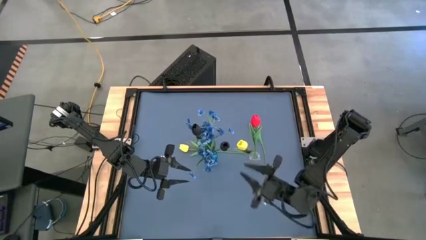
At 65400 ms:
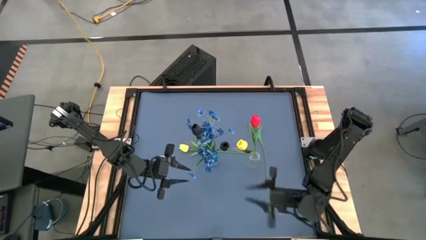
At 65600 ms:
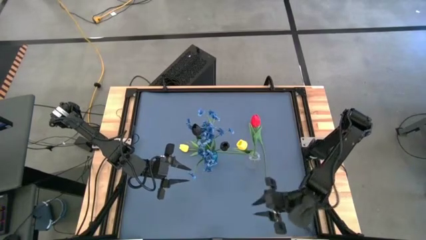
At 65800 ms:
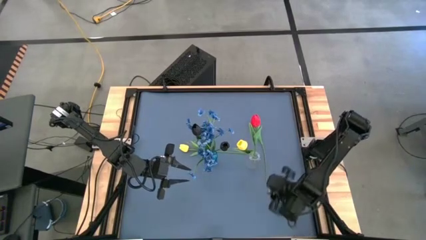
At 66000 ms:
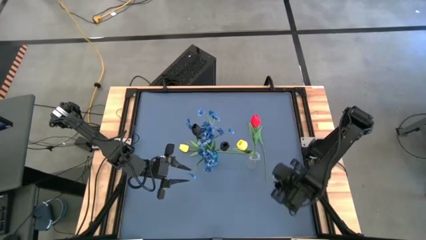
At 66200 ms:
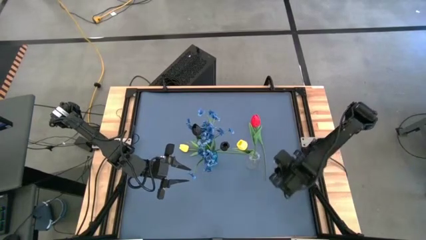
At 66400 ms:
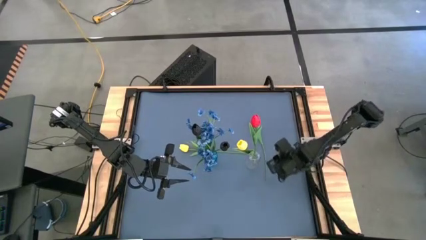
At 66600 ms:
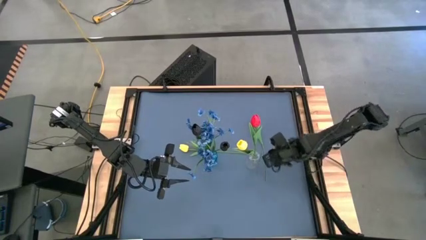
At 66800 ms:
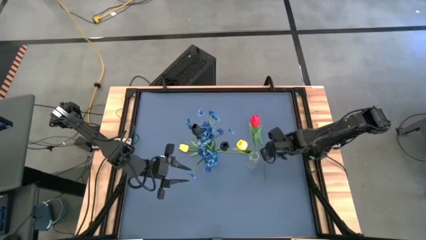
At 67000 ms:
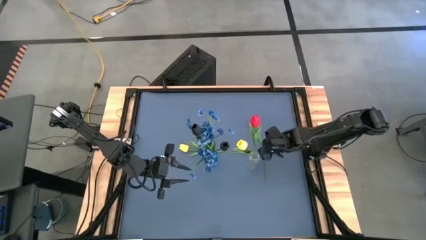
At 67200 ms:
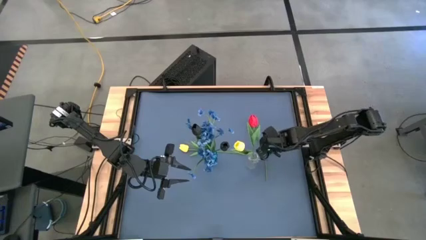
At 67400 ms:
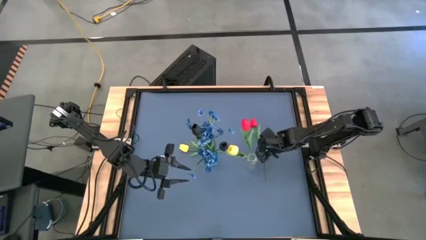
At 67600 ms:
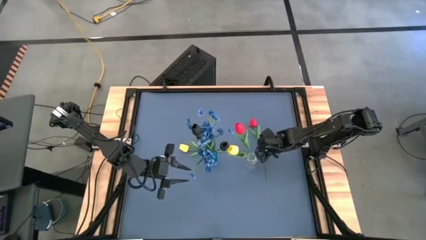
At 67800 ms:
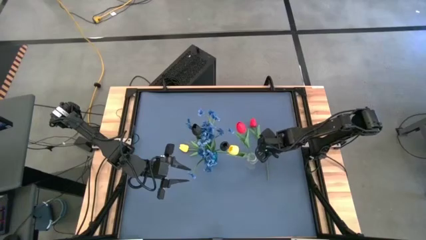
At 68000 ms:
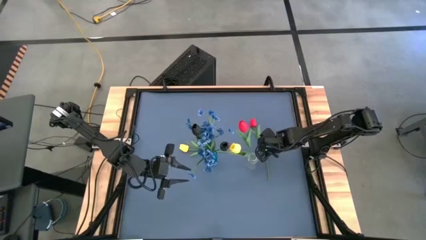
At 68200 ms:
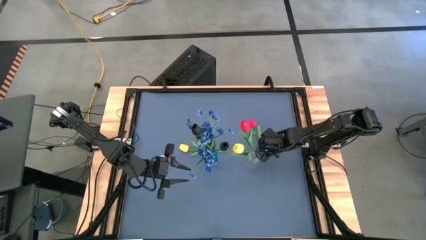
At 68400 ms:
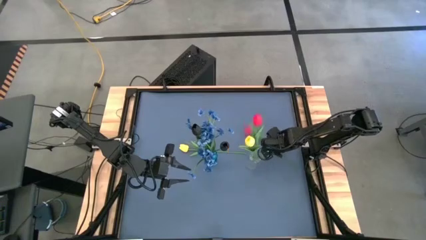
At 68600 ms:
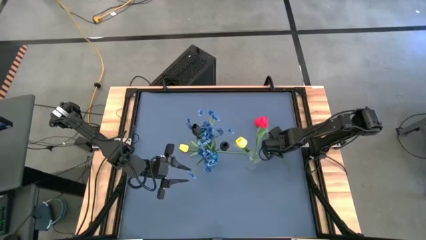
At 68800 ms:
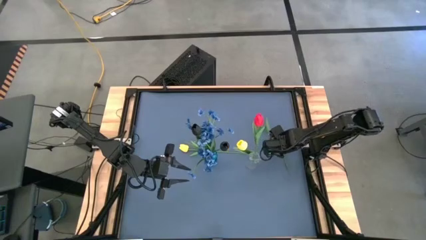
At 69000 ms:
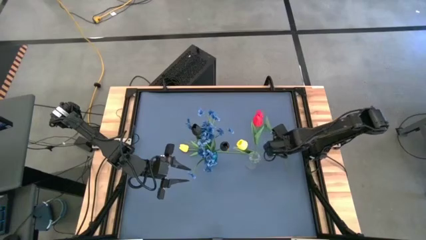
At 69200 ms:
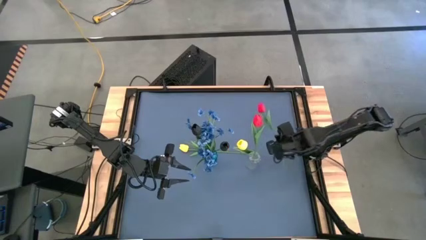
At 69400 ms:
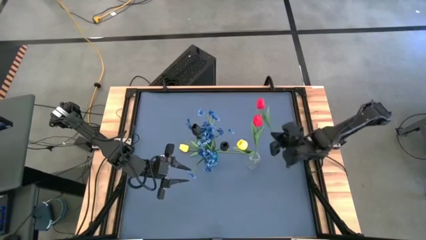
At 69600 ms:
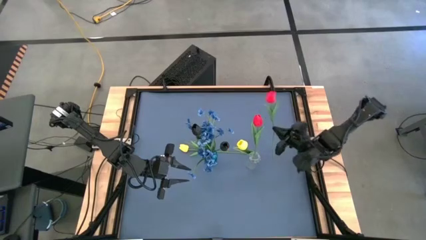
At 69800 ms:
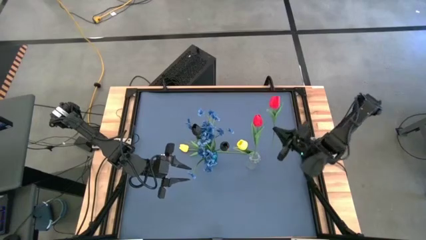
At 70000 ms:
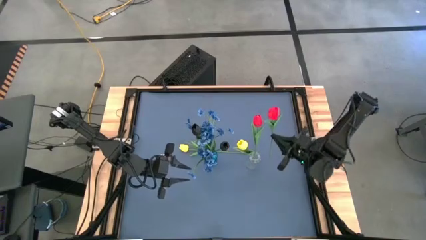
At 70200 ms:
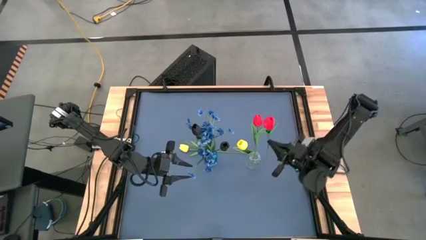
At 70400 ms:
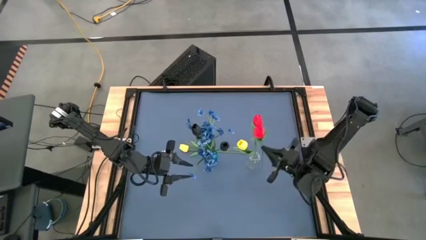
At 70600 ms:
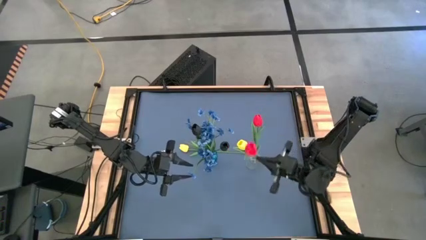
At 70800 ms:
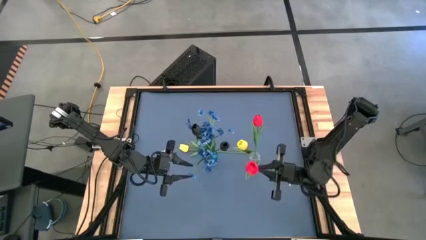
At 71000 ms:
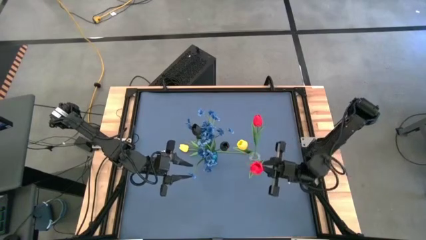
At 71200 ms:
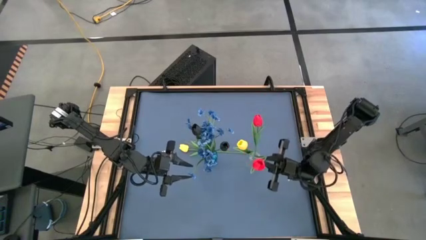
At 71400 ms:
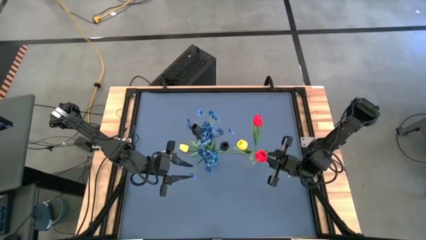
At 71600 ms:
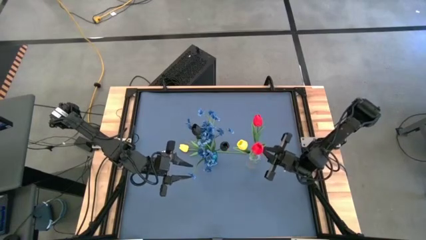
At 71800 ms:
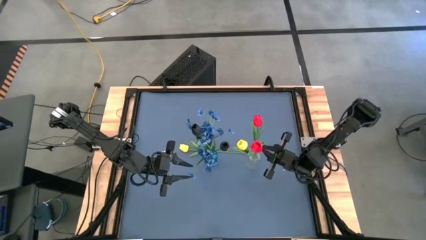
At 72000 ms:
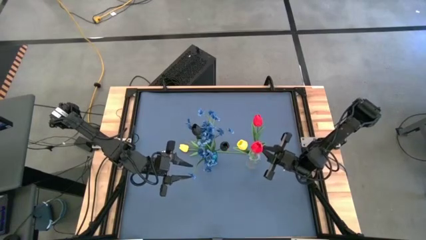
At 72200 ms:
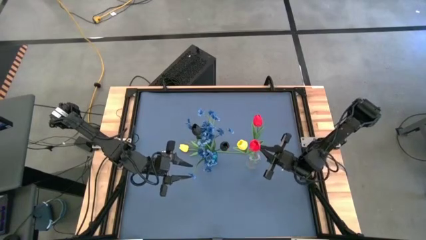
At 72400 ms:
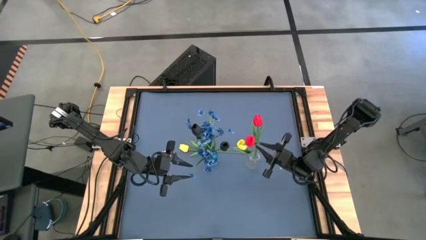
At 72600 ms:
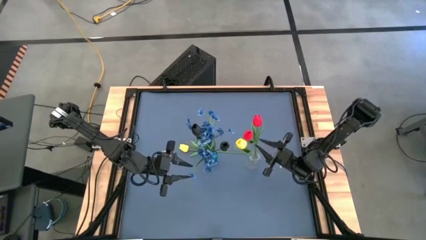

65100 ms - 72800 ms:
Task: Sort flowers into vase by color
Put the red flower into the transparent vase

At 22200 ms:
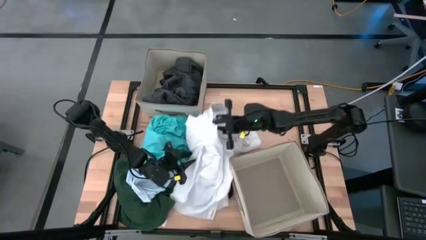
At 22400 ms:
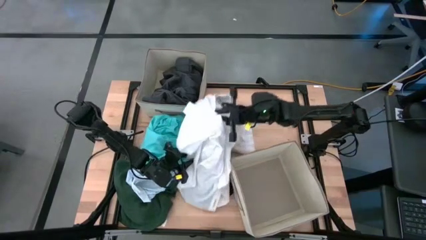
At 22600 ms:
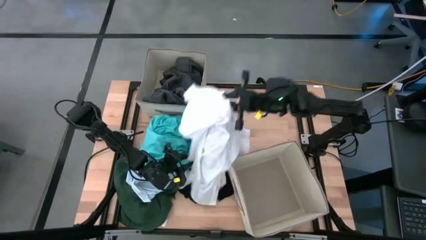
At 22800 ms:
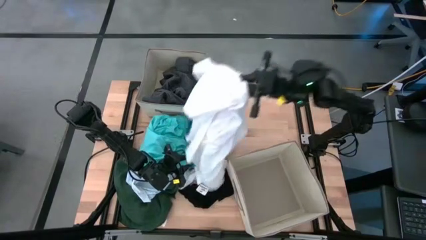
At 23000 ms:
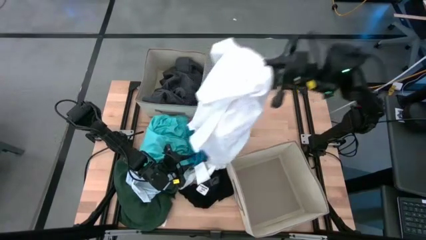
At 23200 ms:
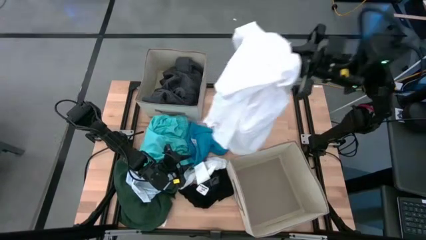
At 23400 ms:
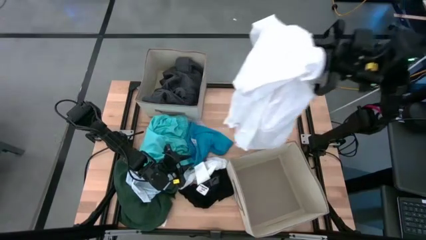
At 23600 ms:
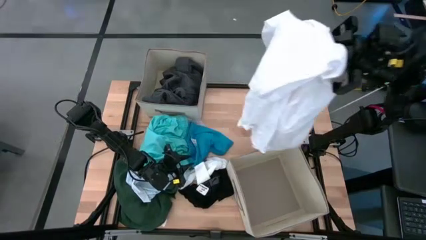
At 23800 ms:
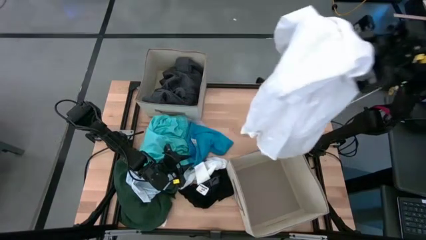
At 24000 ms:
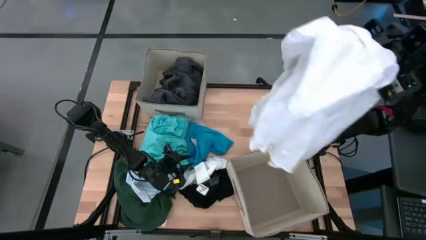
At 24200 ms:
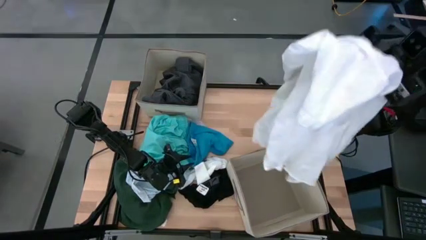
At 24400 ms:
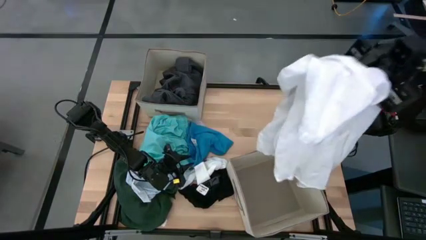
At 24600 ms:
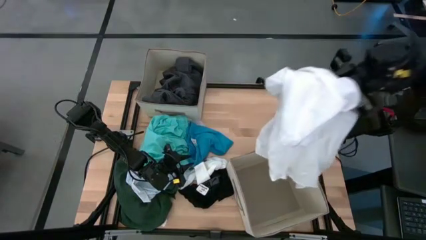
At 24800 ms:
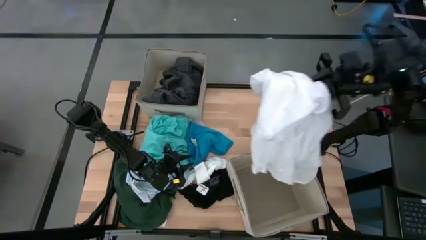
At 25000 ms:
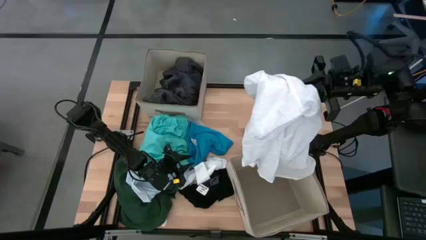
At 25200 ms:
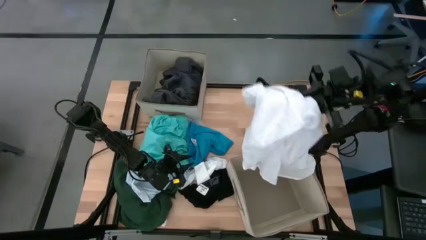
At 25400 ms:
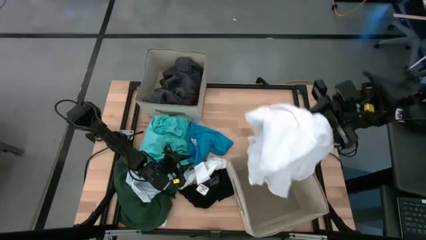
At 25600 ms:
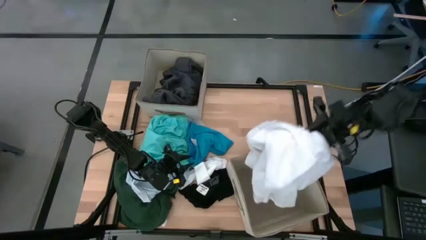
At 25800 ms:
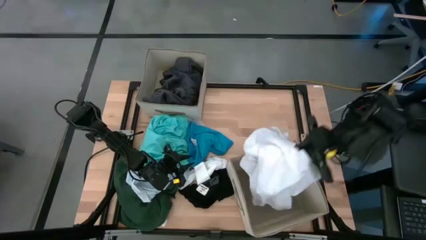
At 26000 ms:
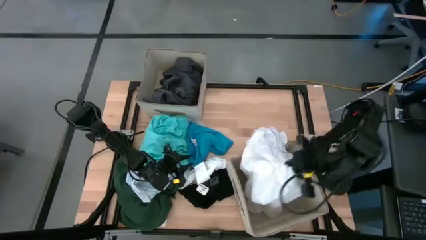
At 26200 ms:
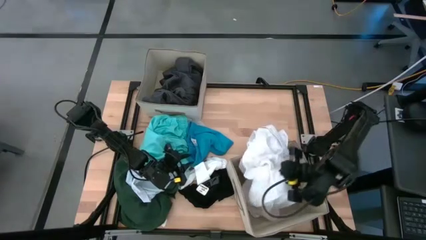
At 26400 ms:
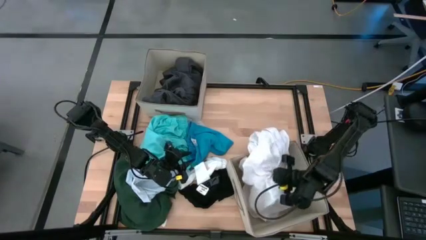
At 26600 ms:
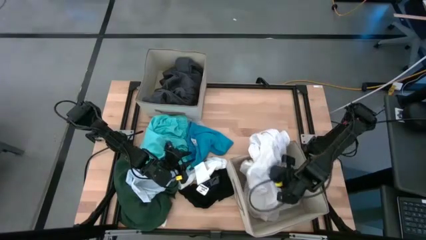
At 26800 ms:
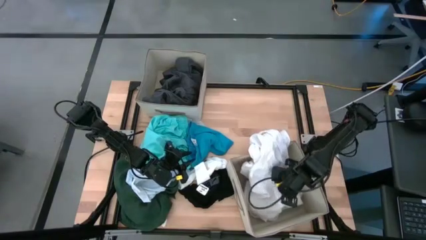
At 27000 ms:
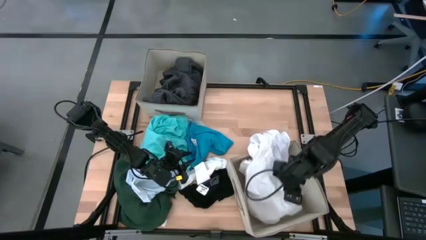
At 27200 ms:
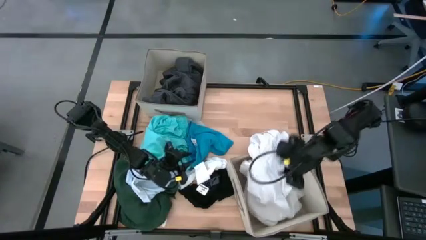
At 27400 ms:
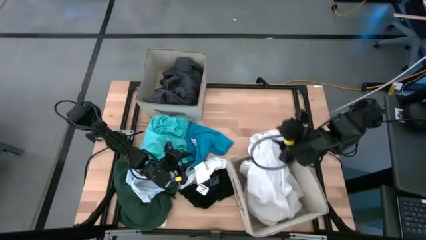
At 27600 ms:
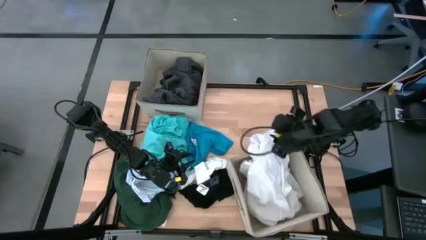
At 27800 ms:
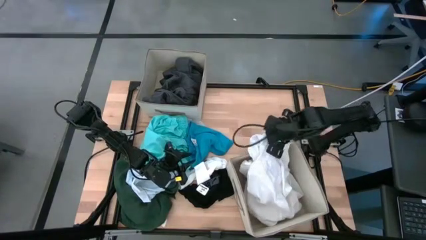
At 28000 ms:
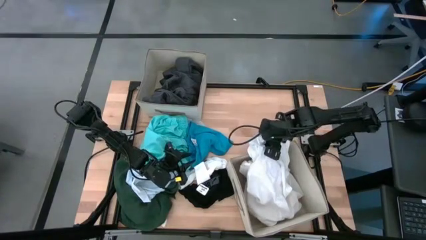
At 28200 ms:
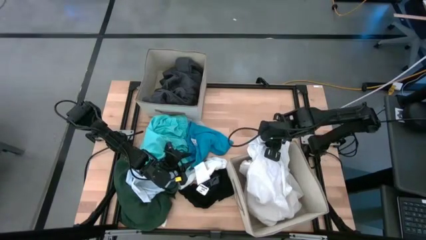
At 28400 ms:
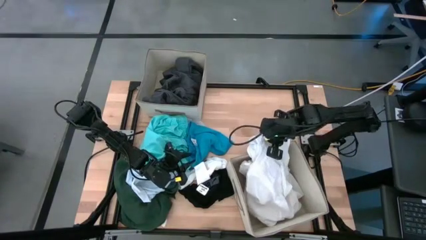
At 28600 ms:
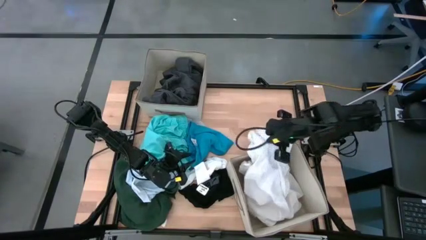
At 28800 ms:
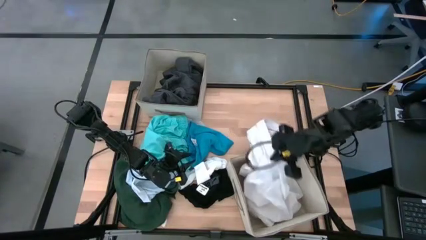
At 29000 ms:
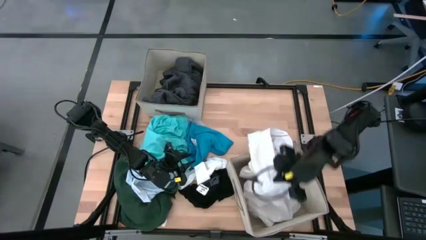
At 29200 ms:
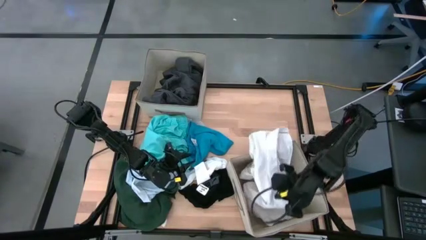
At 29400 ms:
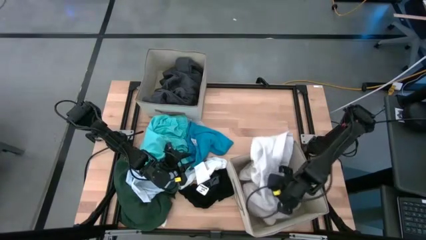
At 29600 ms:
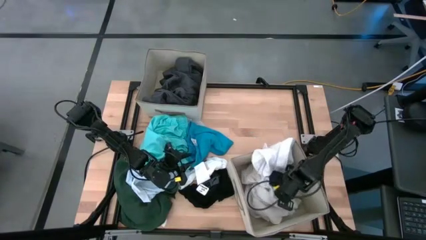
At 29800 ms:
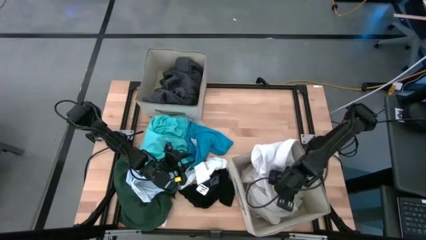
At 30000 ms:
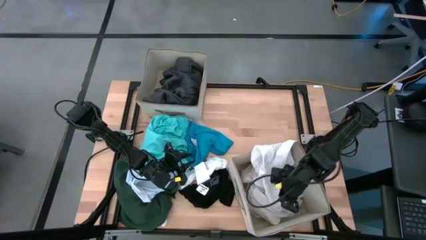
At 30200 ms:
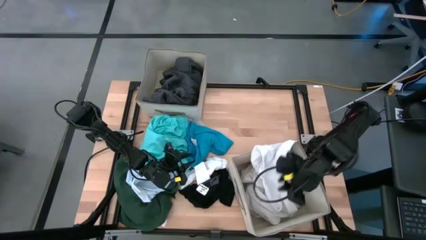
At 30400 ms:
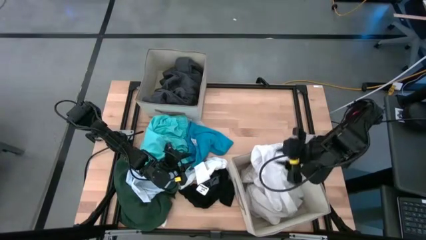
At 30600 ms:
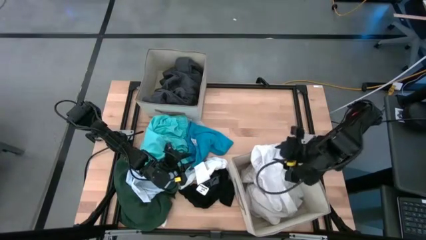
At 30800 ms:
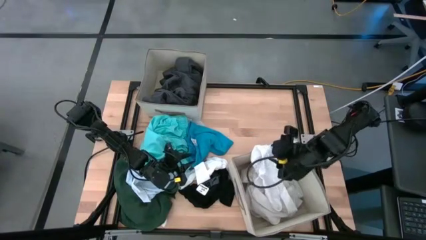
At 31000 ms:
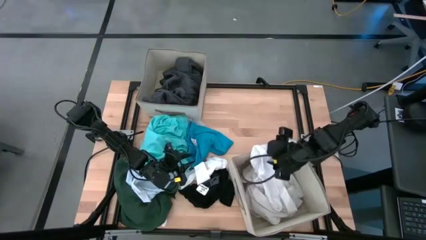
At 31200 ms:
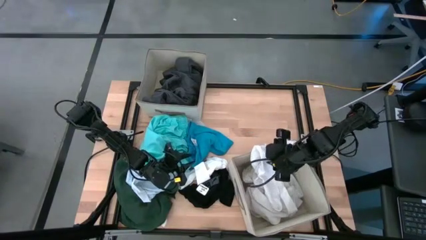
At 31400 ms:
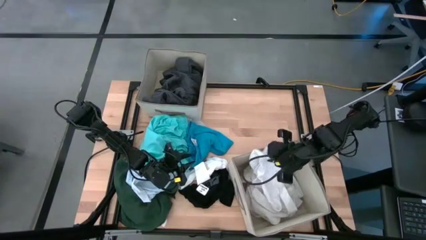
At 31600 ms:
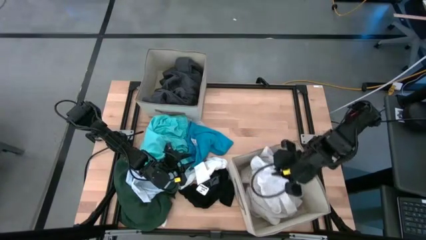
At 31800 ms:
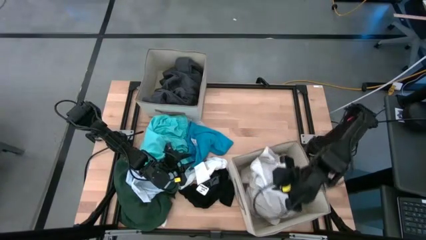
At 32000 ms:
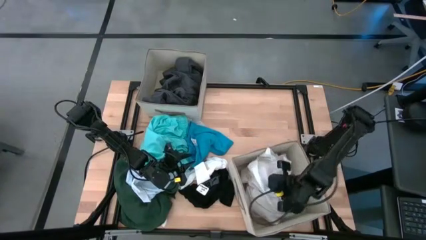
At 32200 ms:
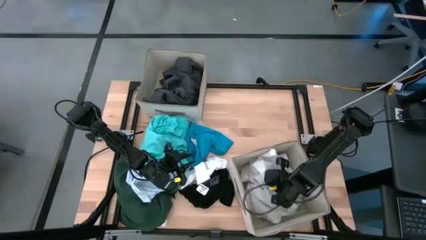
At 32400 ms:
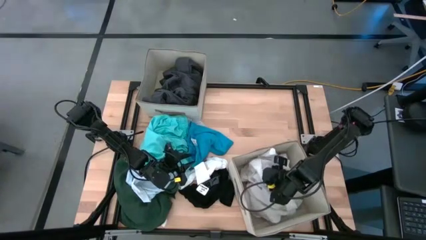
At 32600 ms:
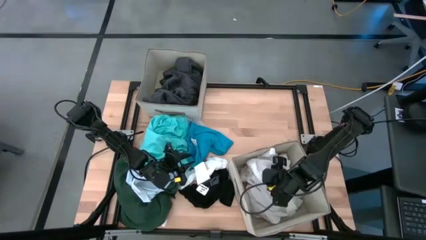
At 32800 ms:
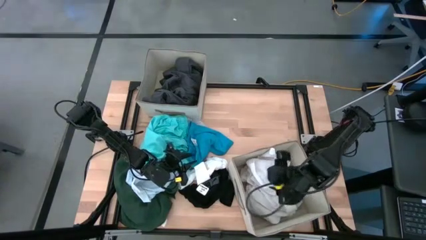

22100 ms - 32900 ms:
Task: Sort clothes
Put the white polo into the bottom white laundry bin
